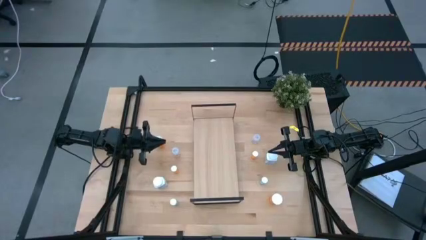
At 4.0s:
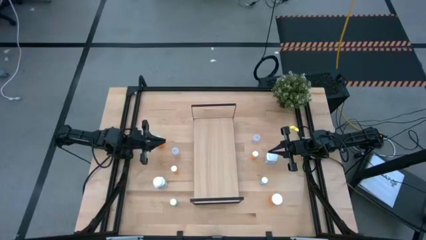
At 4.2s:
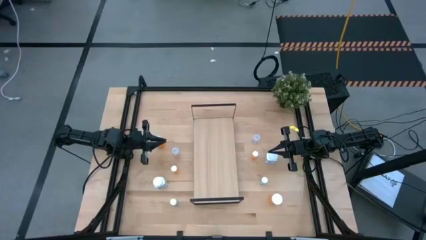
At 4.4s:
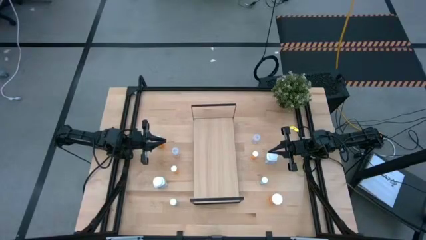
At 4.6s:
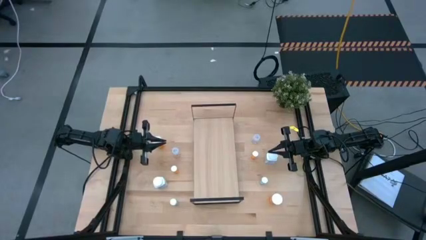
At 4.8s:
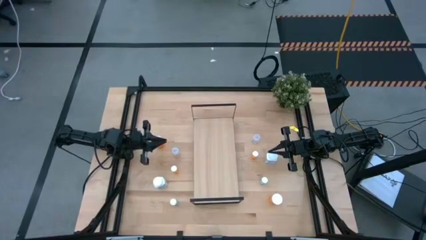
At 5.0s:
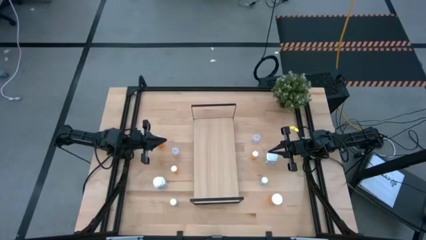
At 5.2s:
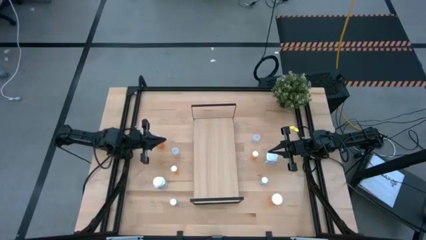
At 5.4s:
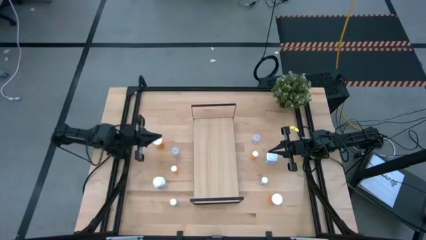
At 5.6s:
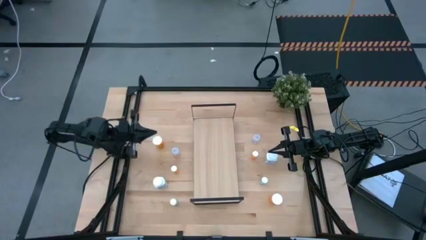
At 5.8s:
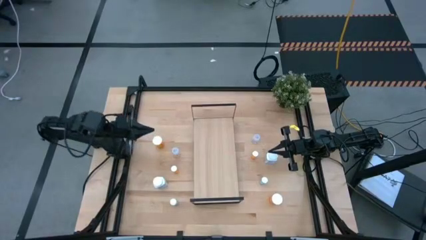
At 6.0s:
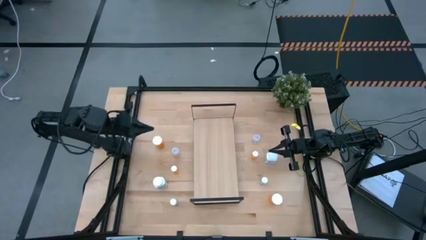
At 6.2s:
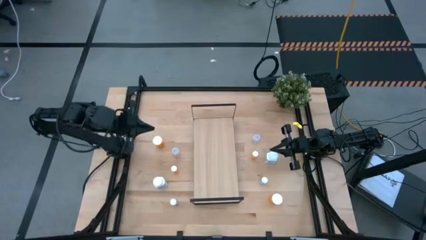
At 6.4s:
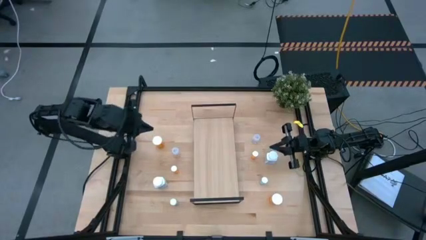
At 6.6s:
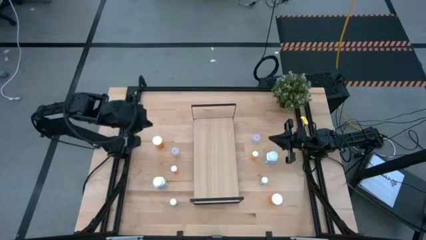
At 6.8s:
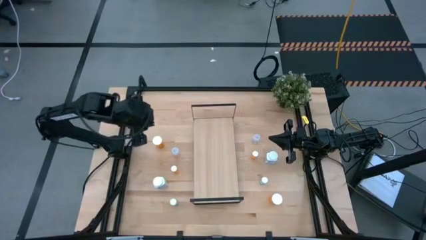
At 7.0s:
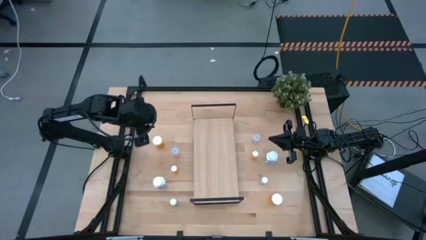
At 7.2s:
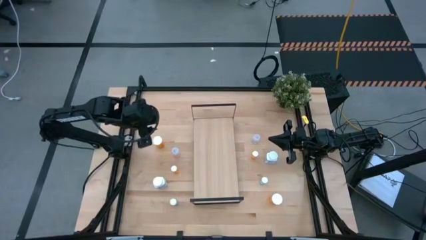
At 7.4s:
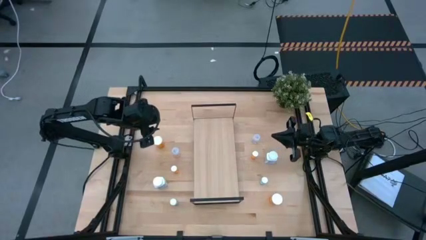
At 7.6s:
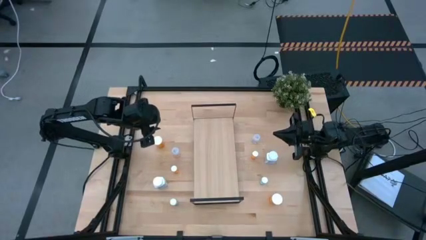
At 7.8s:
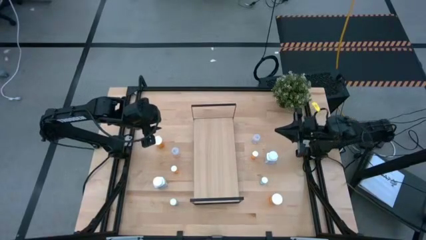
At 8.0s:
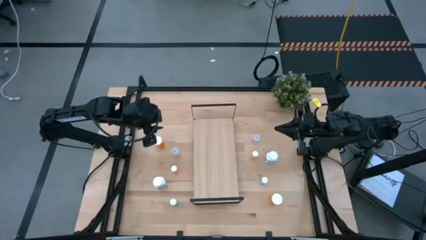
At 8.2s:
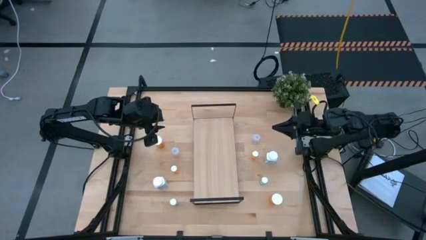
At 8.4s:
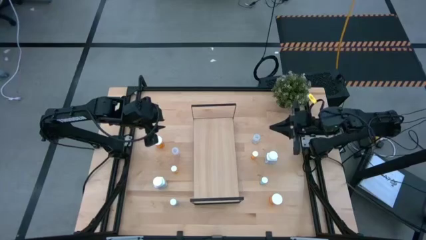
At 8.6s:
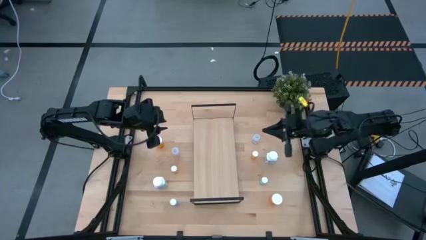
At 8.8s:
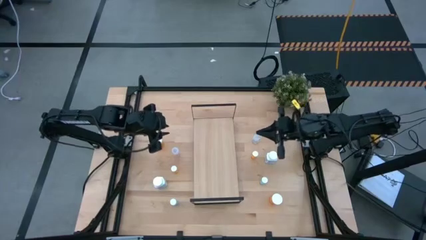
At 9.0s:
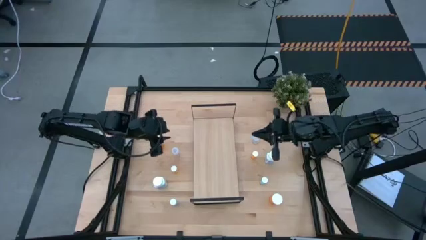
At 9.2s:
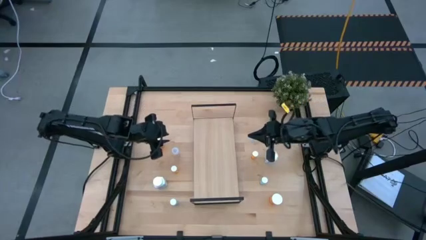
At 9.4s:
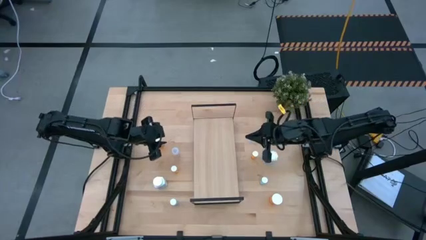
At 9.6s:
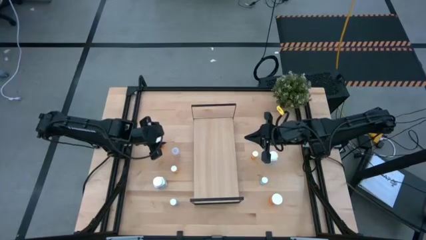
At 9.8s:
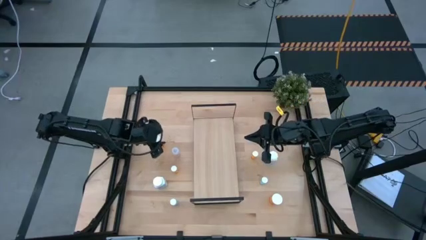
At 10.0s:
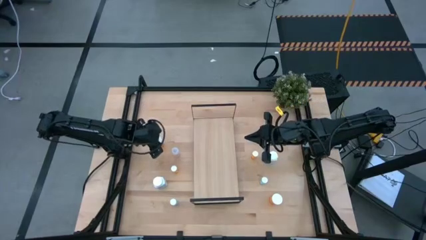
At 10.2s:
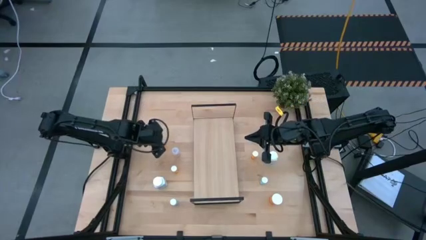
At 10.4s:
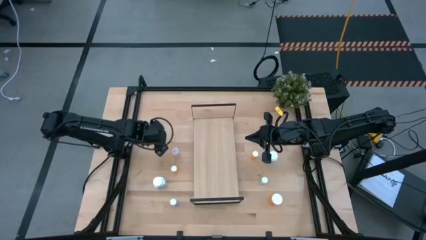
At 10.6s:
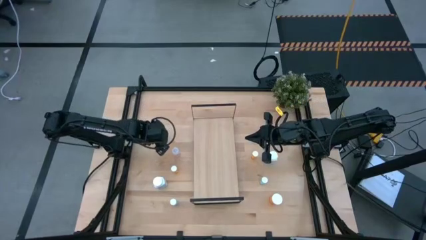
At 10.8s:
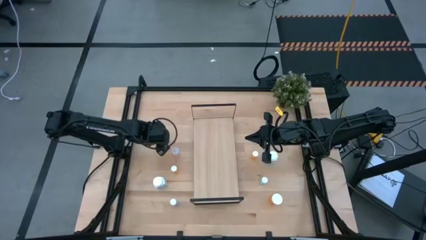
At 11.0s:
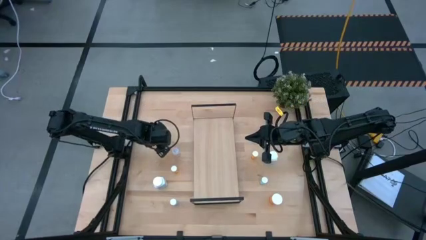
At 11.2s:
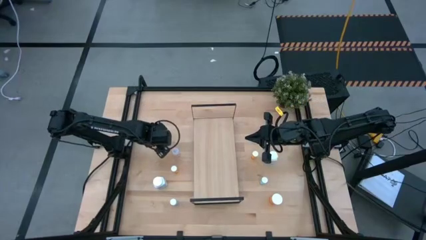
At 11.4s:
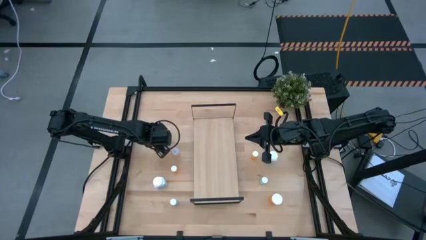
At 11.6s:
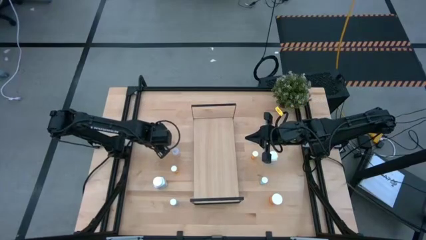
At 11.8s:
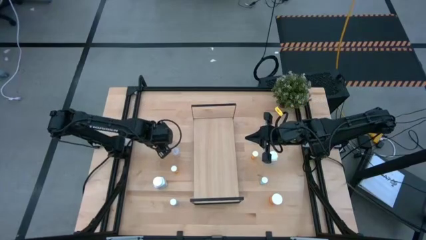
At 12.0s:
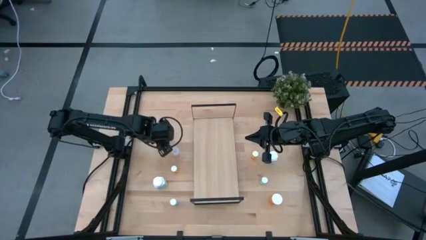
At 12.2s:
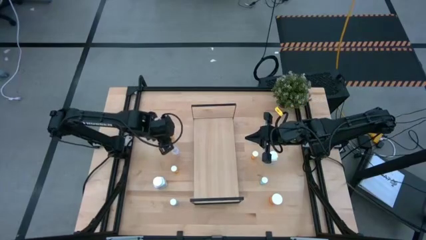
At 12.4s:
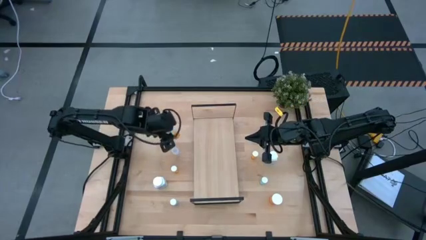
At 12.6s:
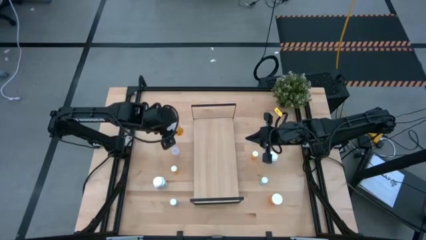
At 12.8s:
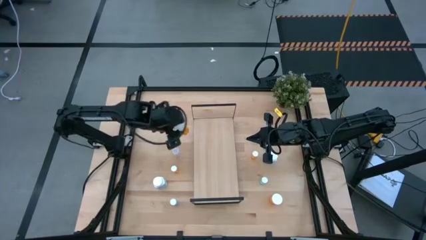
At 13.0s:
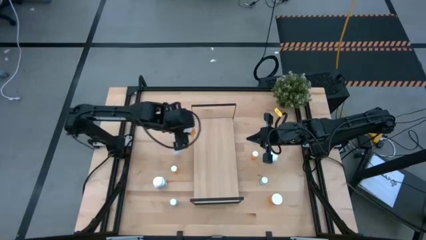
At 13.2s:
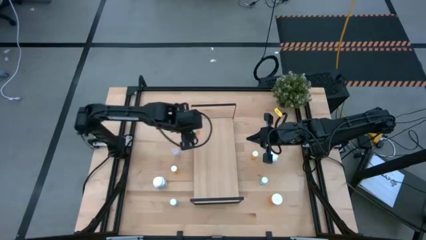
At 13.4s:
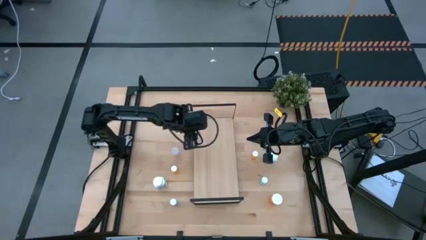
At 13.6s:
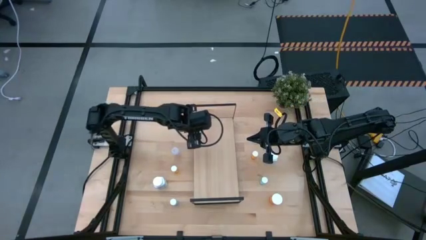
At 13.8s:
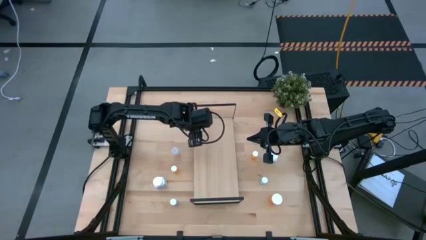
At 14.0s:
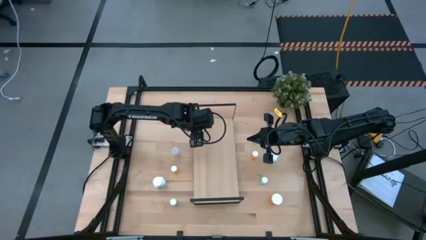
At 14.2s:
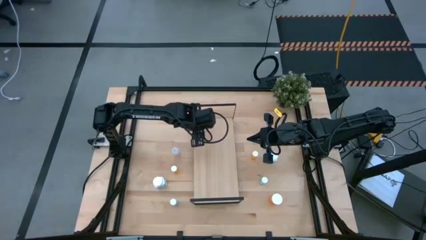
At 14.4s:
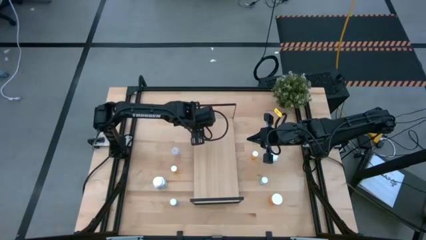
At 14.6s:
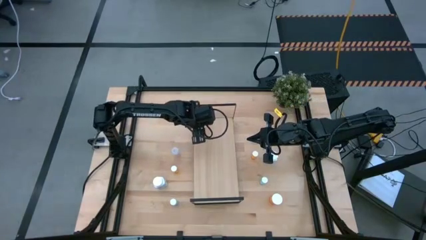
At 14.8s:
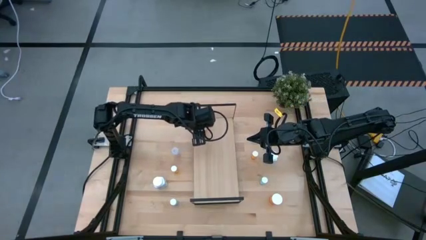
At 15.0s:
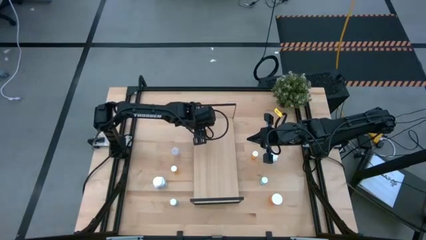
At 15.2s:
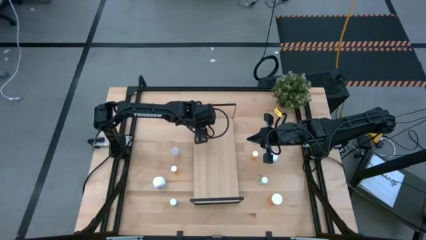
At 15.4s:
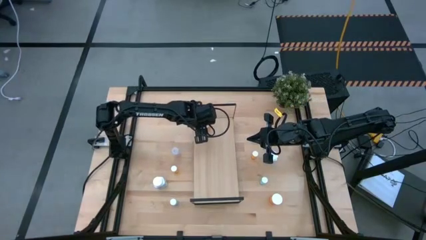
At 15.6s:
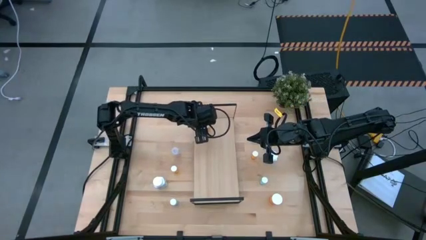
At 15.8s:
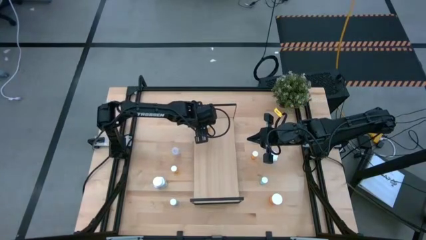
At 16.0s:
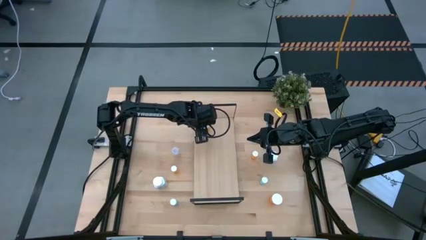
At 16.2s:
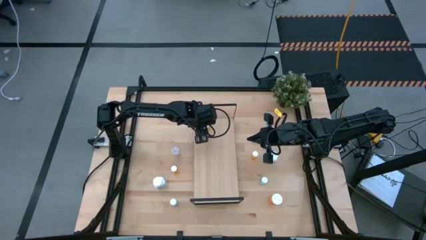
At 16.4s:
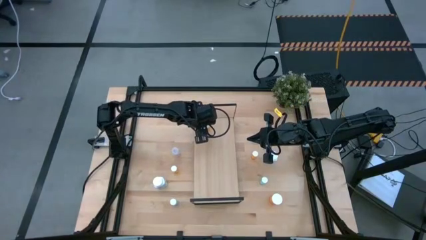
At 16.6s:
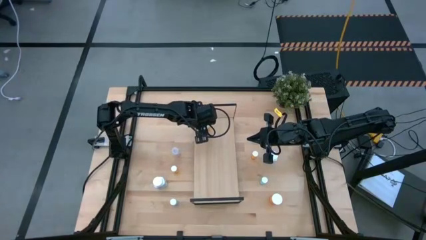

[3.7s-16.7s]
Task: Pick and place medicine bottles onto shelf by color
Put the left big orange medicine bottle on the shelf
